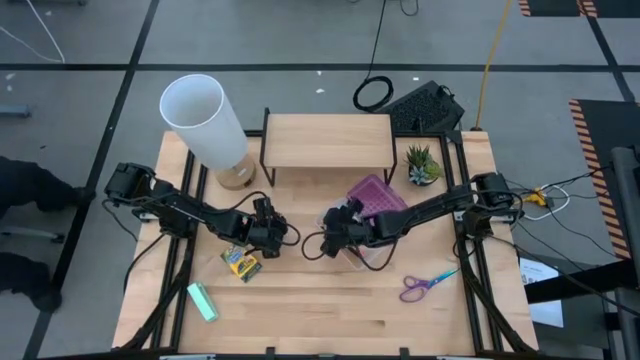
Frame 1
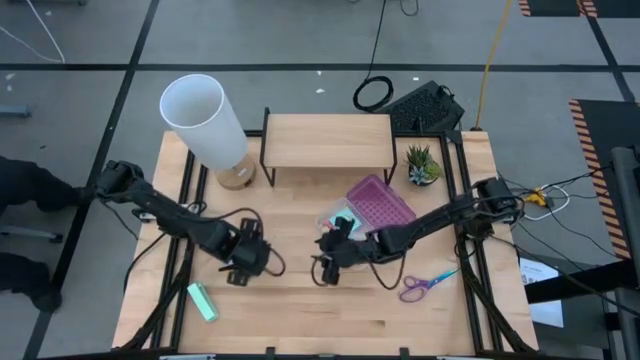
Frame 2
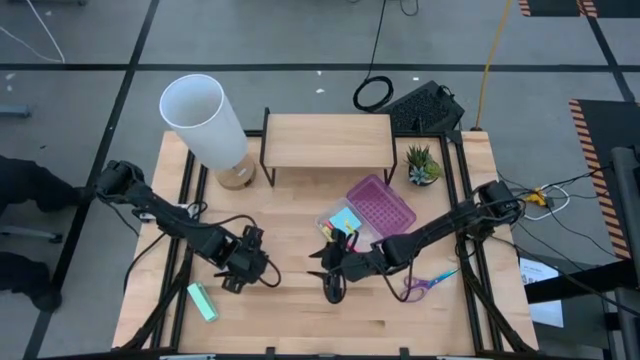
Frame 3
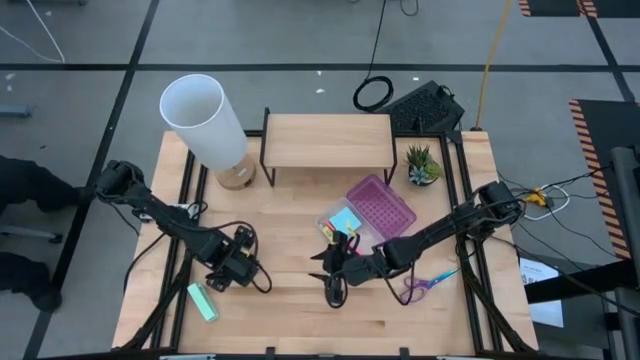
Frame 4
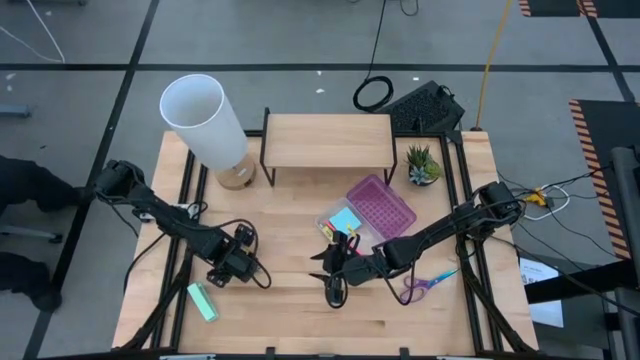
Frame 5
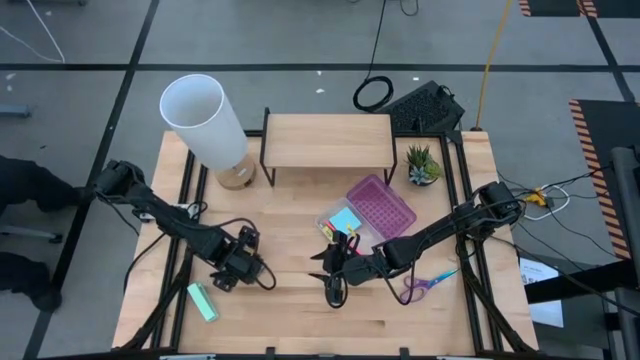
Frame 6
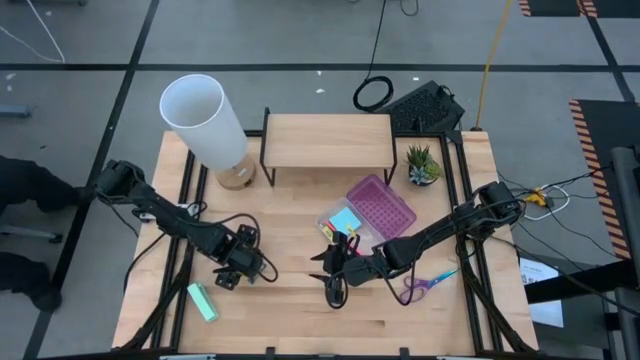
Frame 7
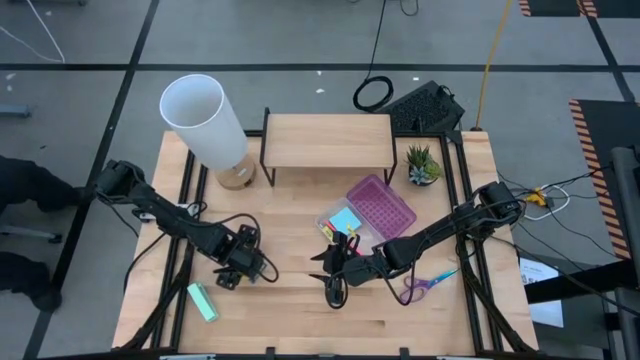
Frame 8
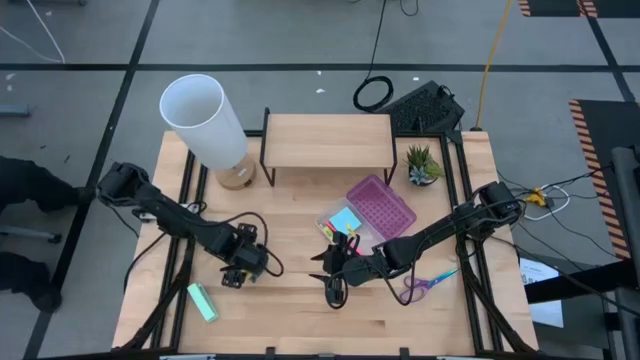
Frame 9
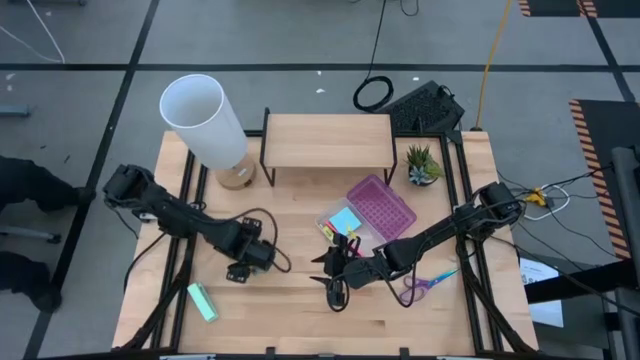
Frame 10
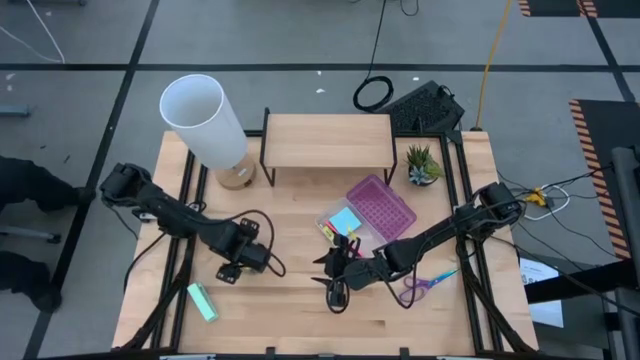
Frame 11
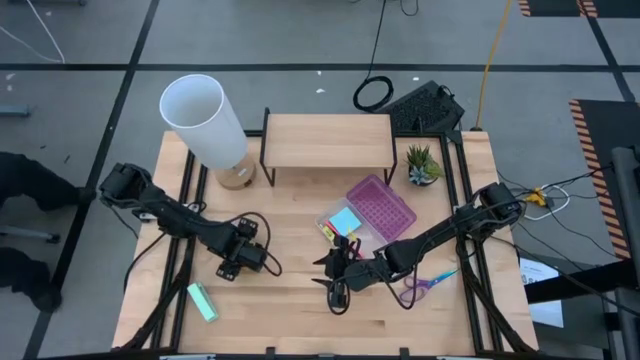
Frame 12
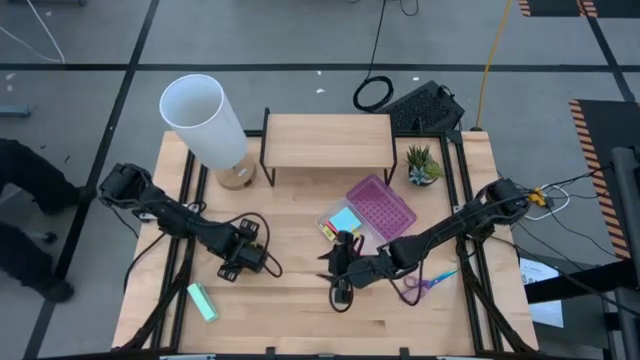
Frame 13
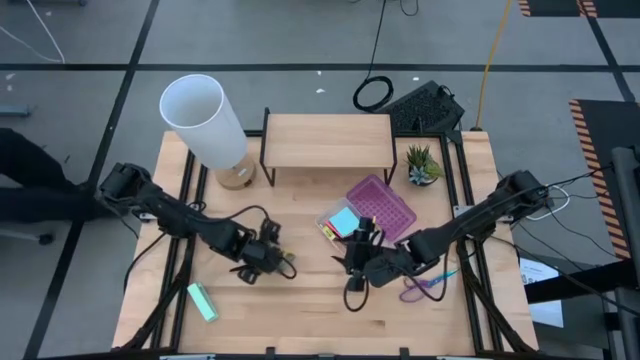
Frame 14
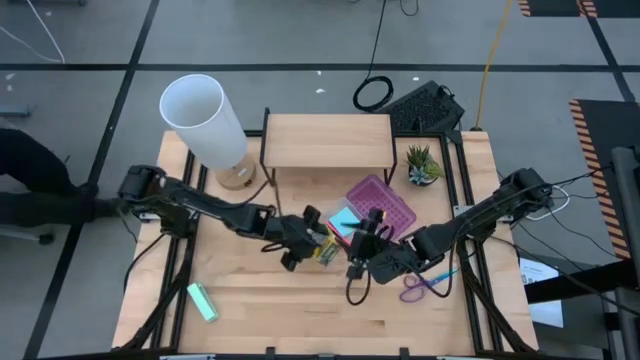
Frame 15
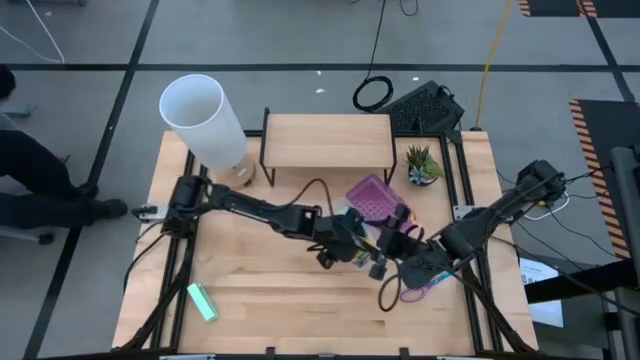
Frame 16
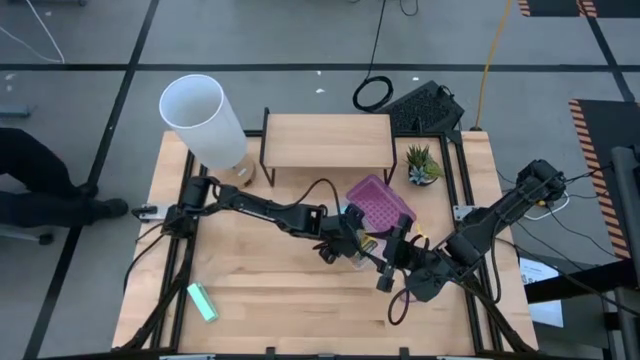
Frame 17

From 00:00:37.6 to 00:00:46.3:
Task: Pack school essentials
Put the crayon box into the transparent violet supply box

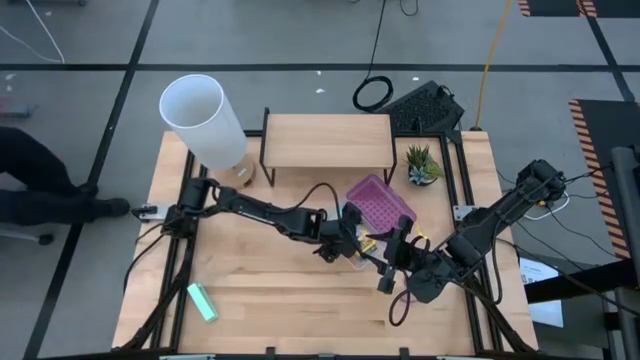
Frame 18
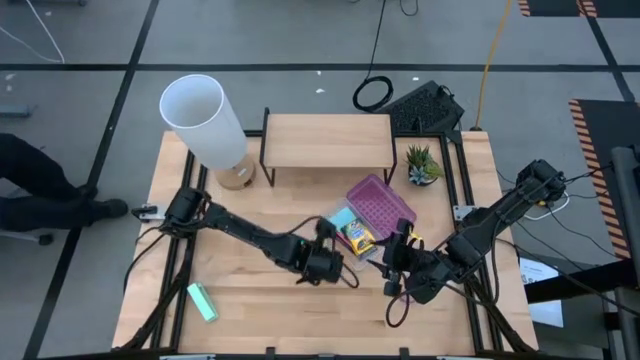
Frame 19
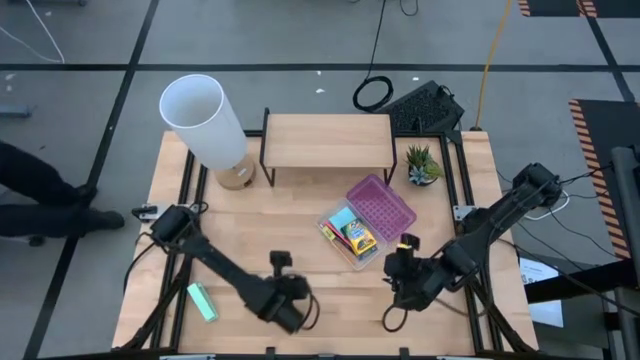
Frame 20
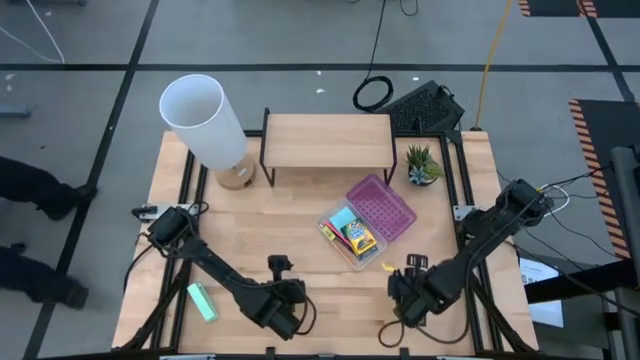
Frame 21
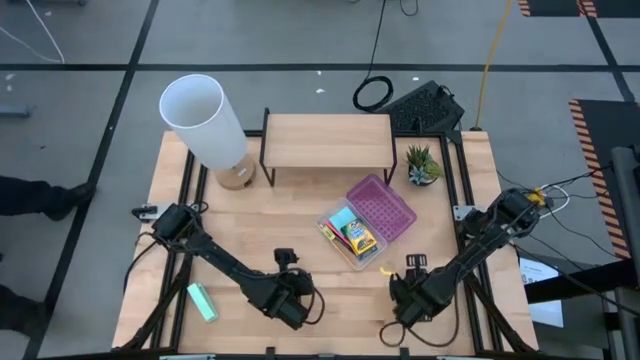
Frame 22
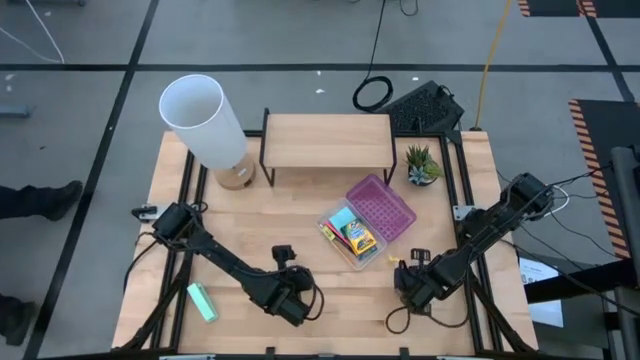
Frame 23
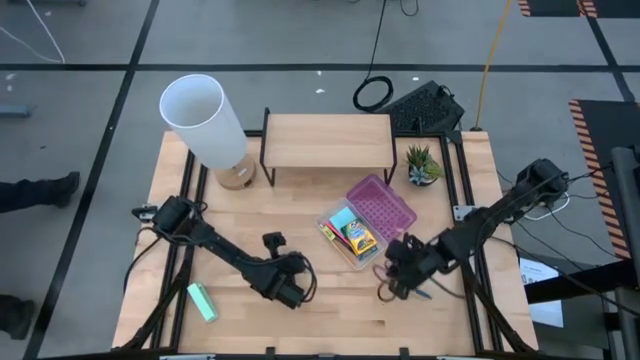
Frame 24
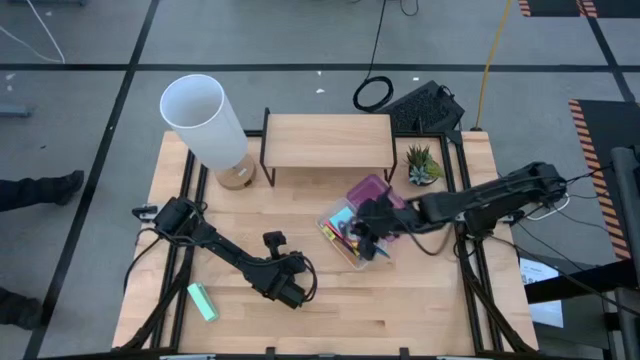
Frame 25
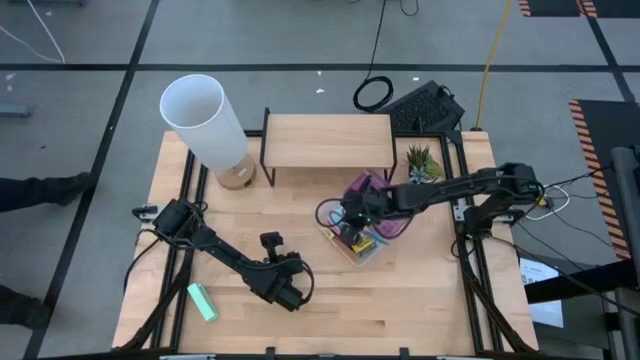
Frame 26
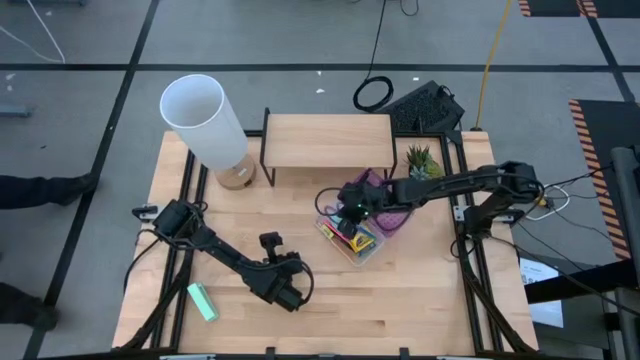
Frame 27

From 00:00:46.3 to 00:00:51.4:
Put the scissors into the transparent violet supply box

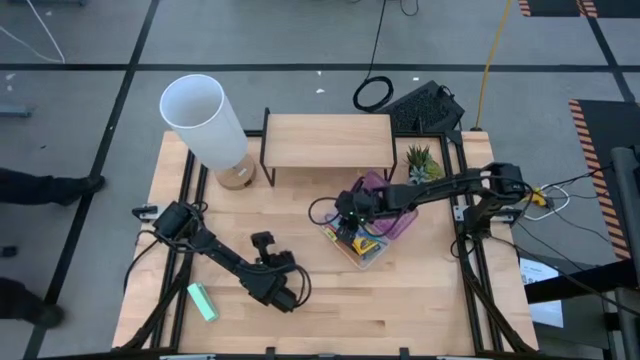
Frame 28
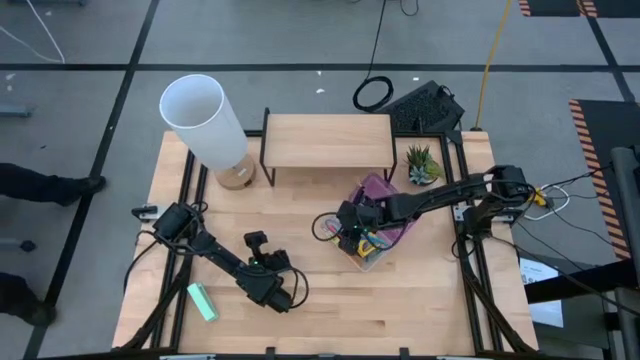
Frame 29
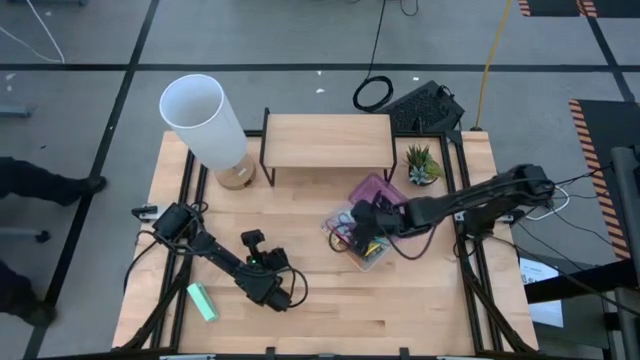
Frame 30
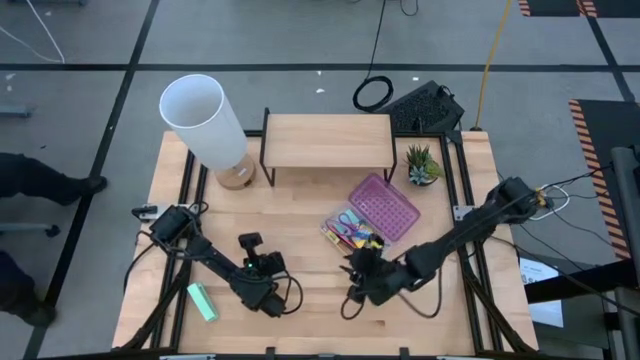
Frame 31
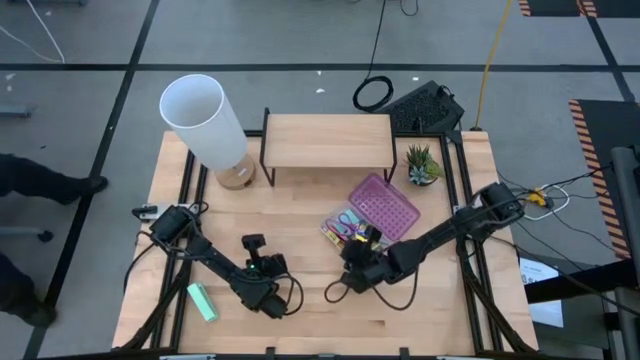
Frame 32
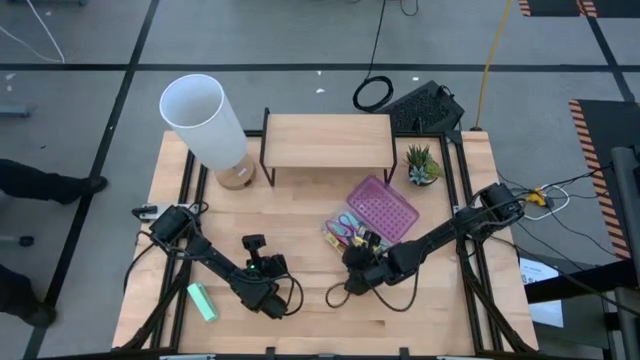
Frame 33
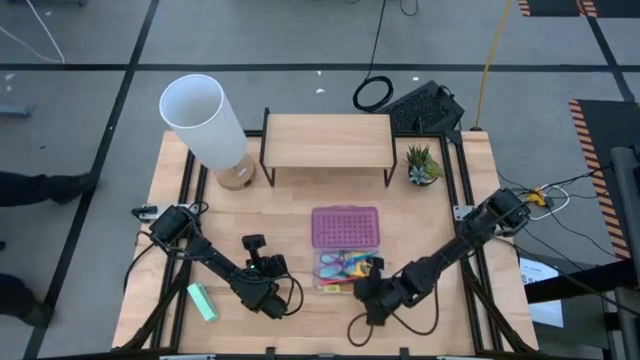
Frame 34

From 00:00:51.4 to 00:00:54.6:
Move the transparent violet supply box to the center of the table

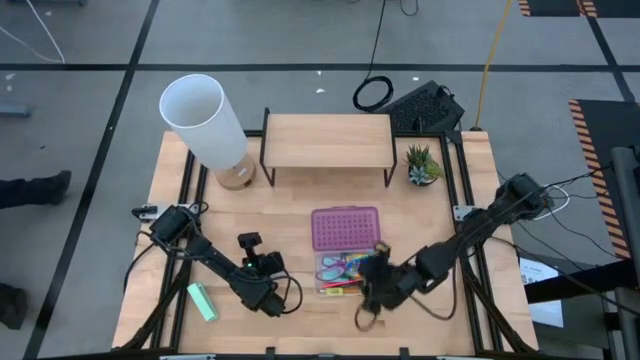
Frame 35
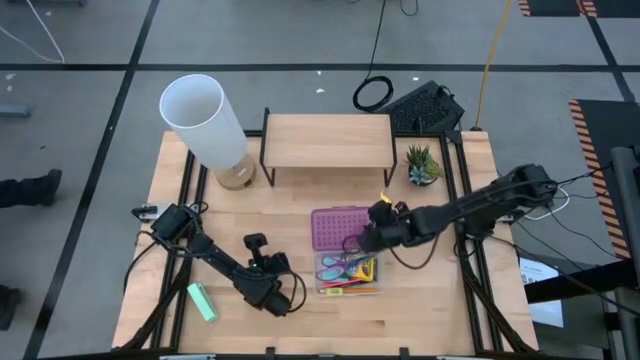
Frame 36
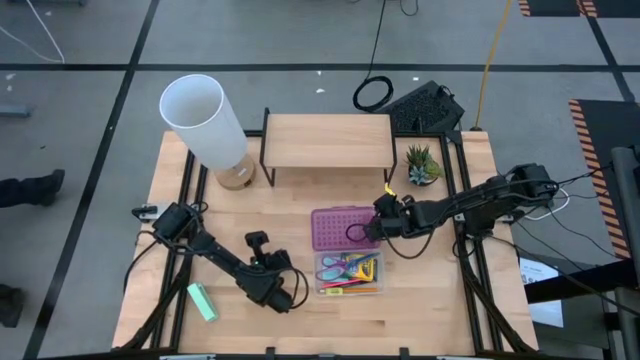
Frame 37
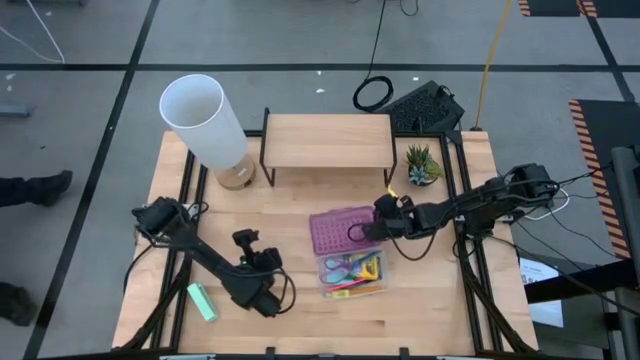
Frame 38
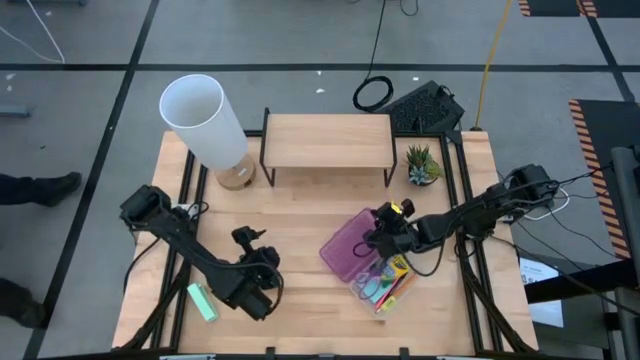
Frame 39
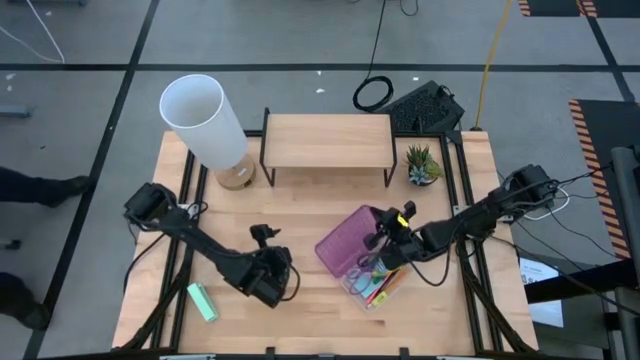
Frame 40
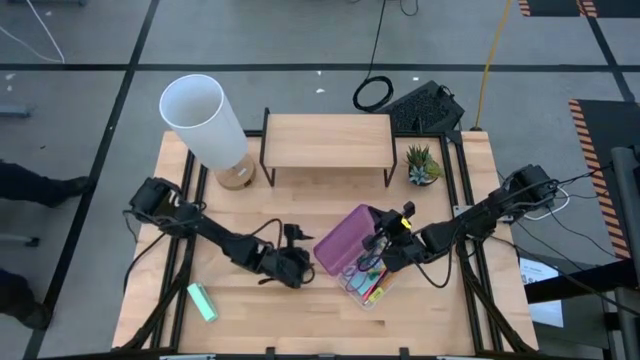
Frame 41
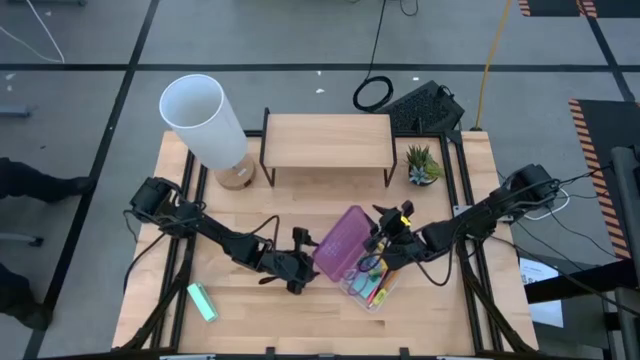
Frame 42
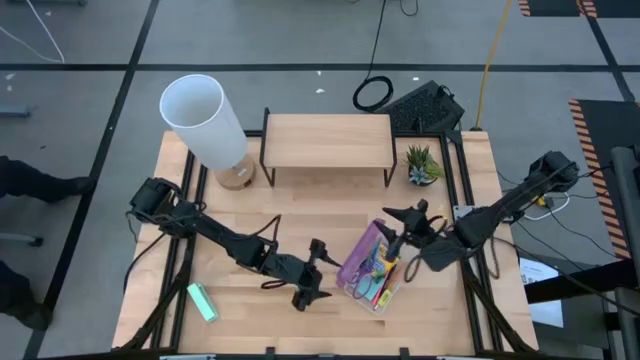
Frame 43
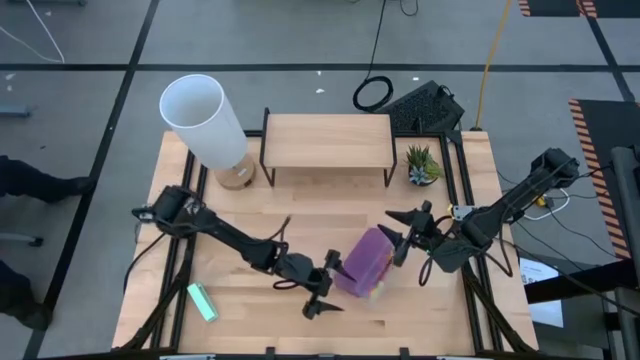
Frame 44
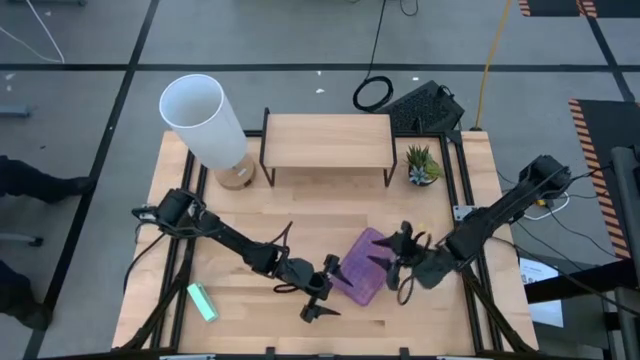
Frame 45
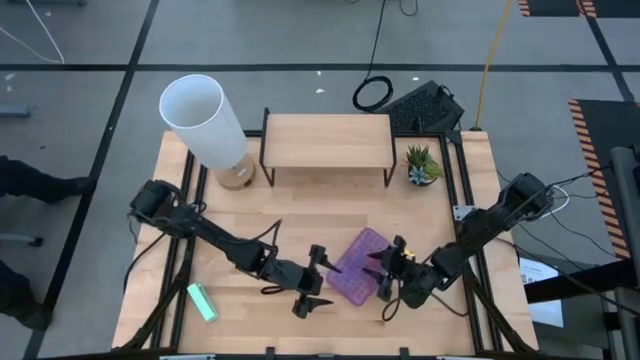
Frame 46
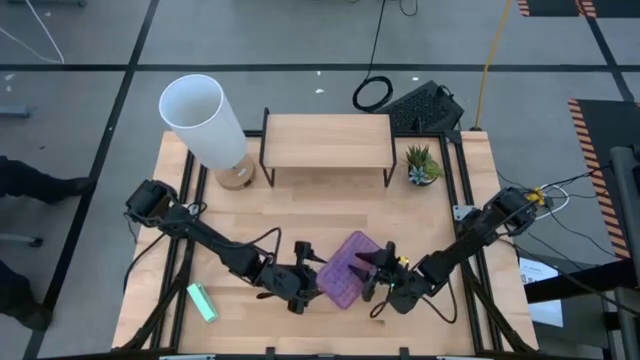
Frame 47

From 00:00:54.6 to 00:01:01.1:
Close the transparent violet supply box
